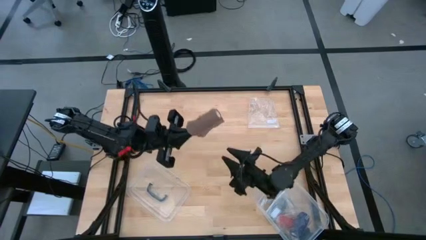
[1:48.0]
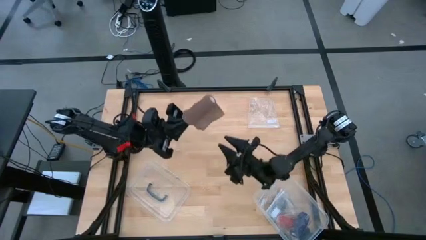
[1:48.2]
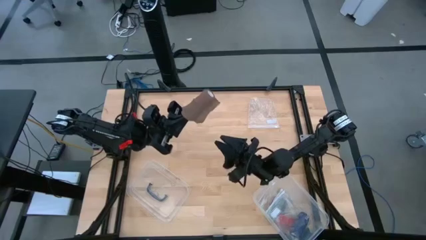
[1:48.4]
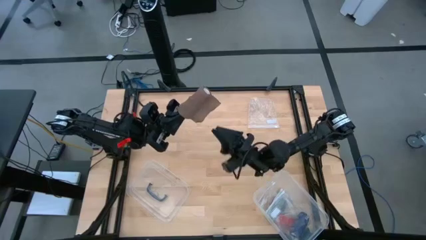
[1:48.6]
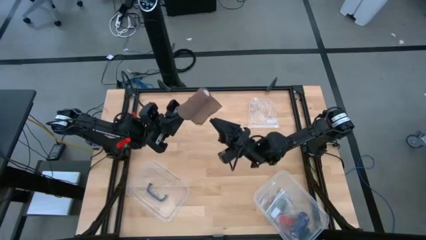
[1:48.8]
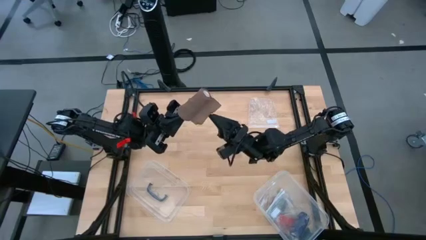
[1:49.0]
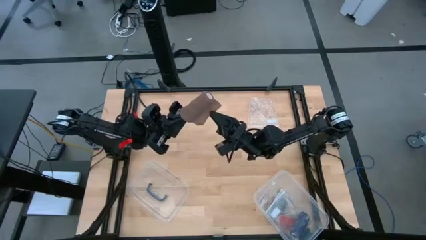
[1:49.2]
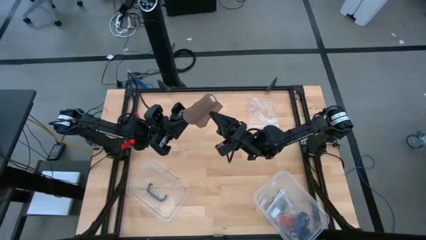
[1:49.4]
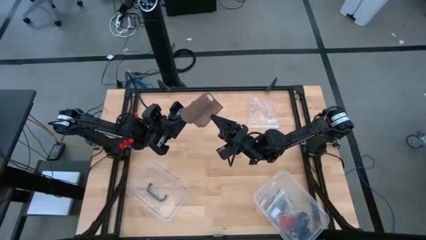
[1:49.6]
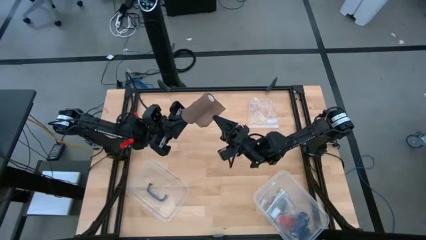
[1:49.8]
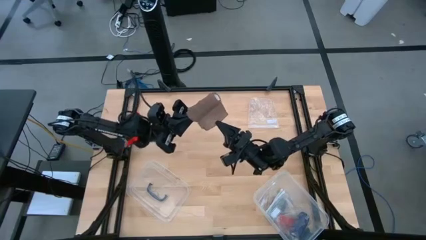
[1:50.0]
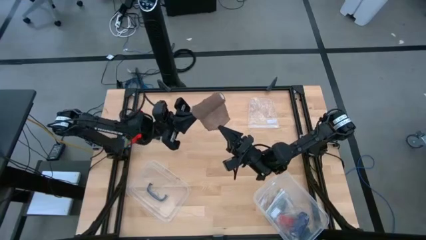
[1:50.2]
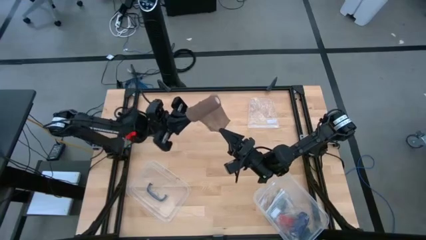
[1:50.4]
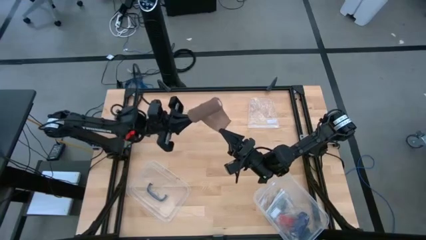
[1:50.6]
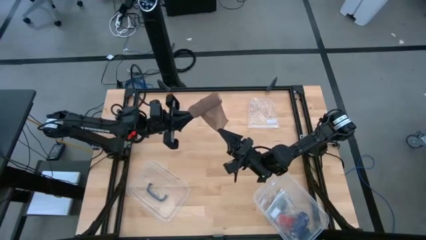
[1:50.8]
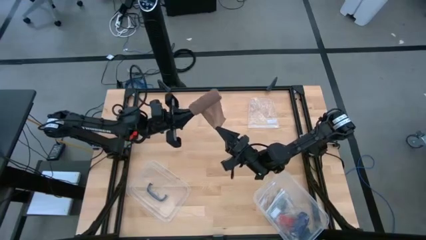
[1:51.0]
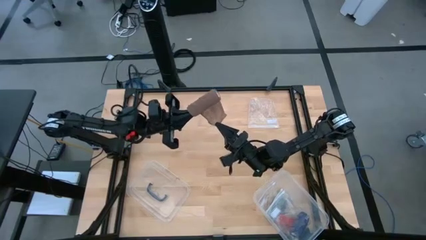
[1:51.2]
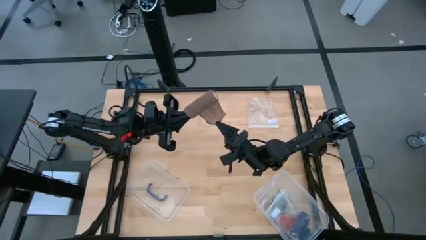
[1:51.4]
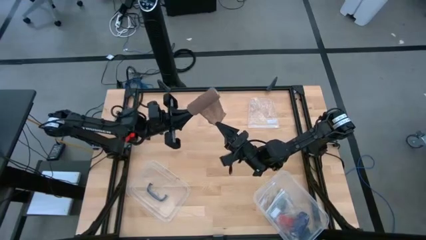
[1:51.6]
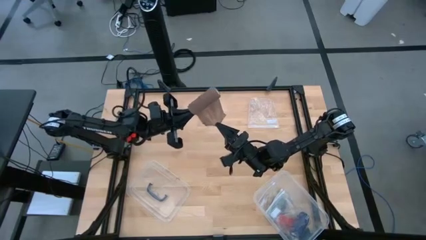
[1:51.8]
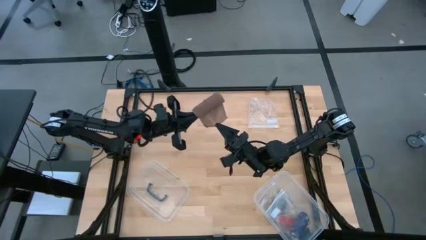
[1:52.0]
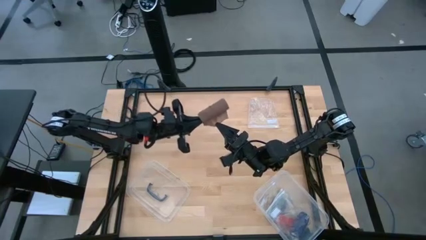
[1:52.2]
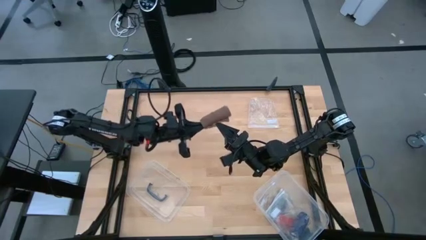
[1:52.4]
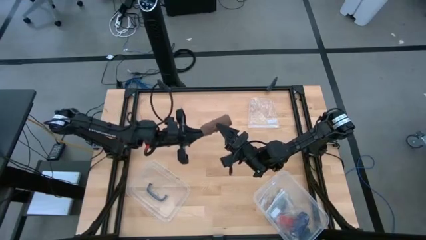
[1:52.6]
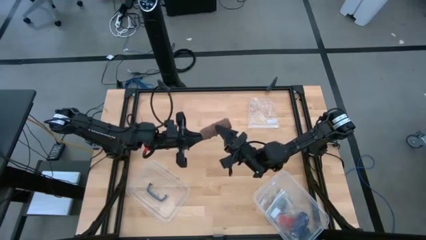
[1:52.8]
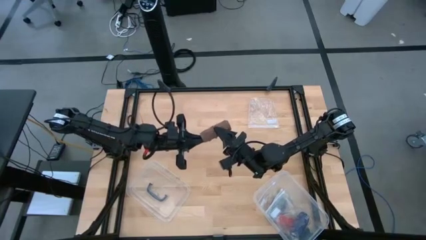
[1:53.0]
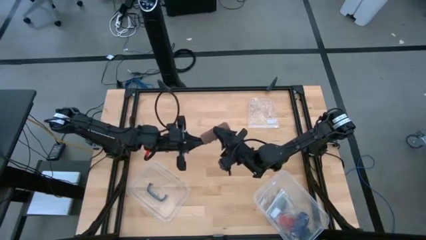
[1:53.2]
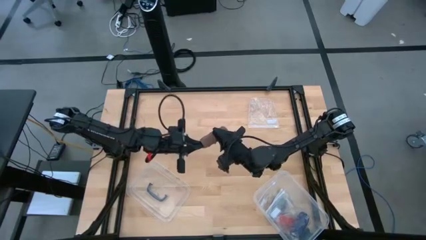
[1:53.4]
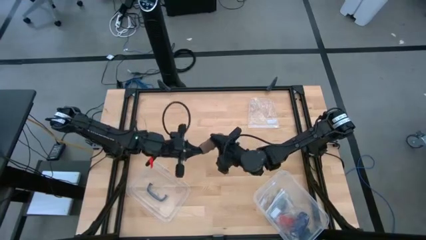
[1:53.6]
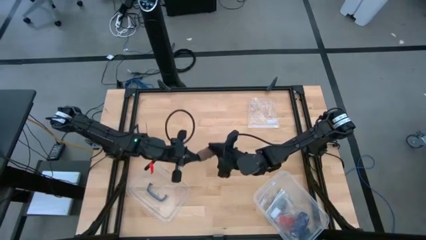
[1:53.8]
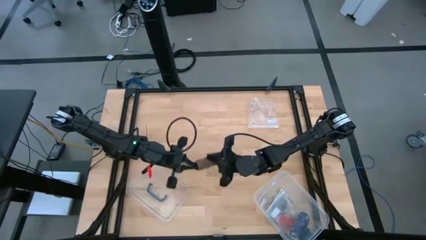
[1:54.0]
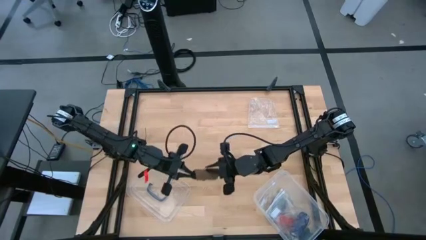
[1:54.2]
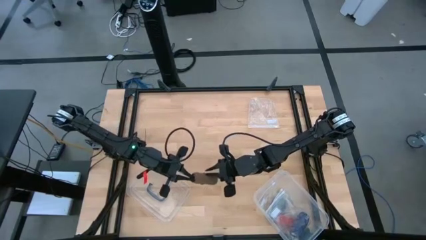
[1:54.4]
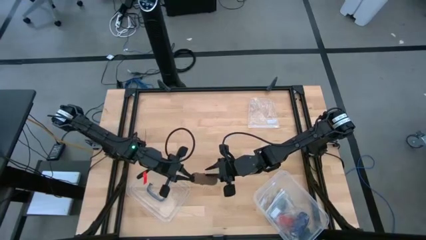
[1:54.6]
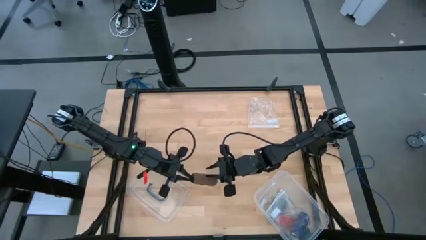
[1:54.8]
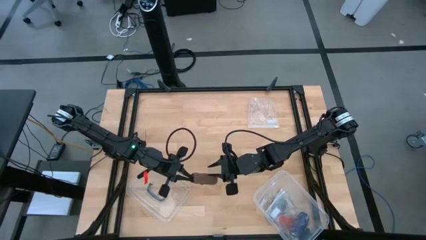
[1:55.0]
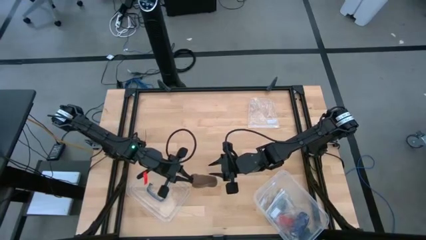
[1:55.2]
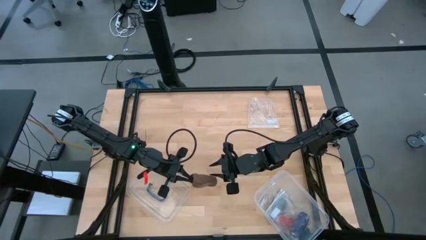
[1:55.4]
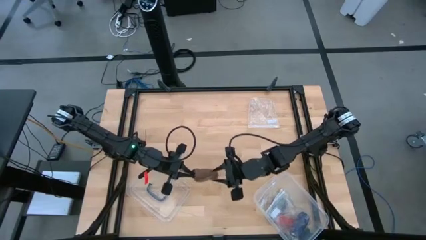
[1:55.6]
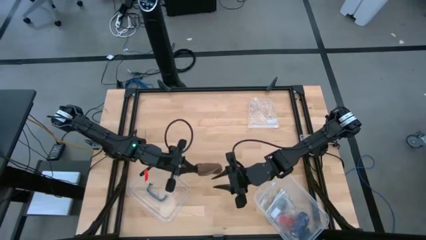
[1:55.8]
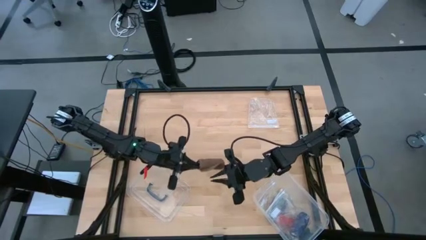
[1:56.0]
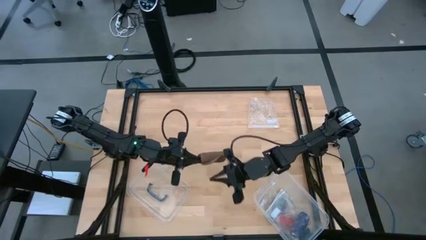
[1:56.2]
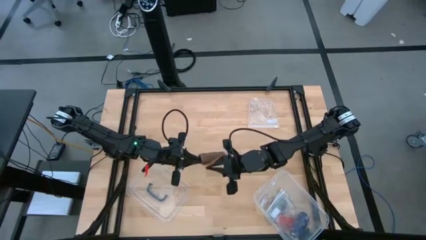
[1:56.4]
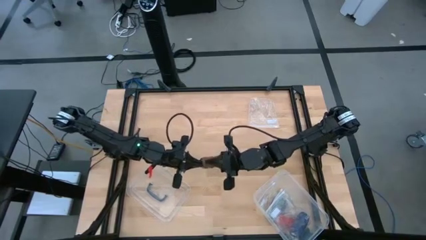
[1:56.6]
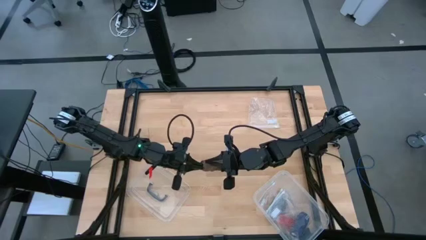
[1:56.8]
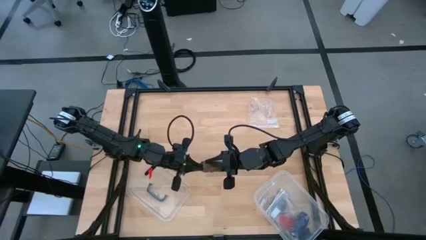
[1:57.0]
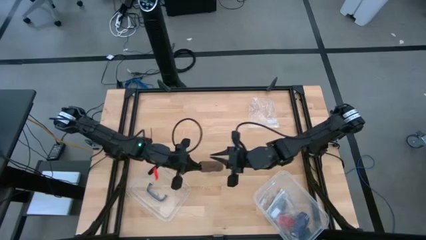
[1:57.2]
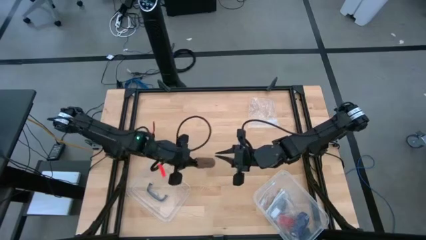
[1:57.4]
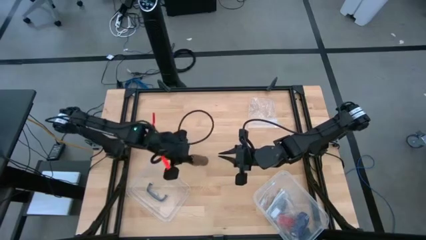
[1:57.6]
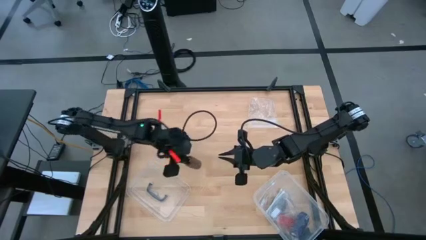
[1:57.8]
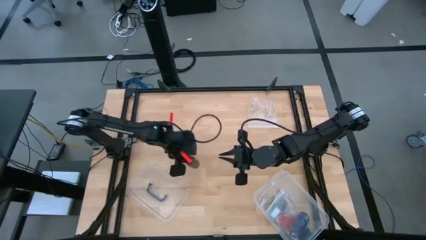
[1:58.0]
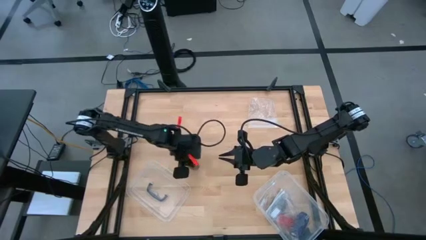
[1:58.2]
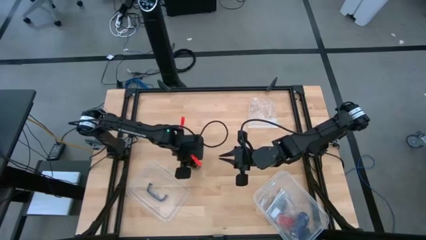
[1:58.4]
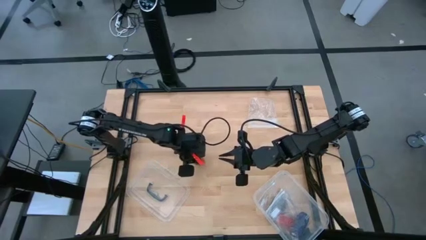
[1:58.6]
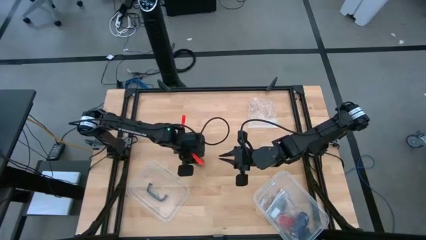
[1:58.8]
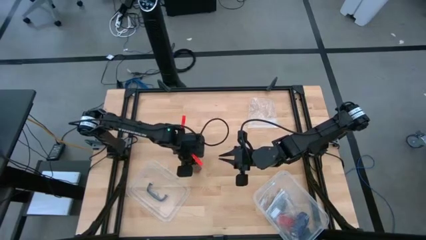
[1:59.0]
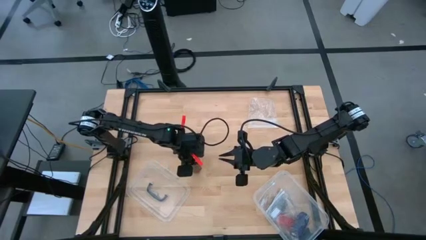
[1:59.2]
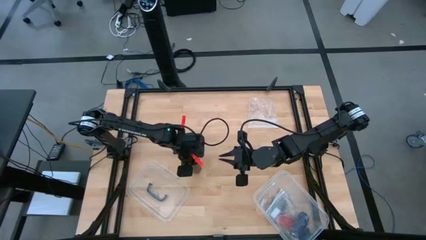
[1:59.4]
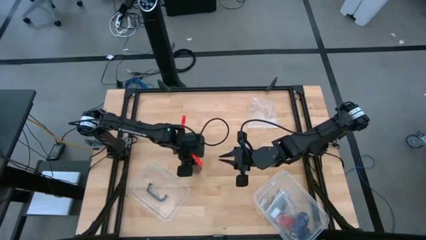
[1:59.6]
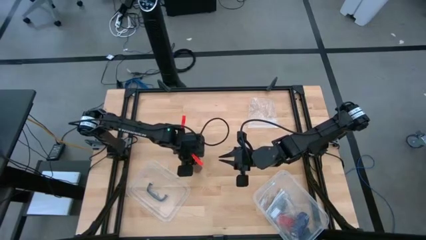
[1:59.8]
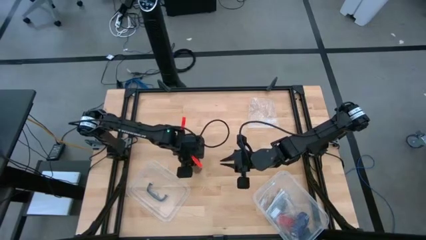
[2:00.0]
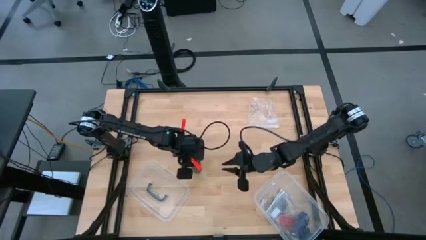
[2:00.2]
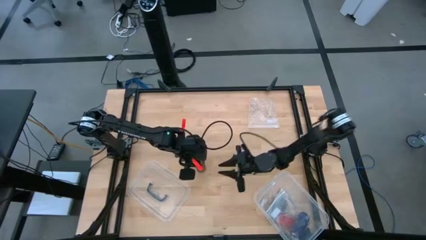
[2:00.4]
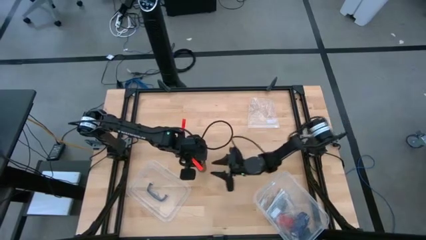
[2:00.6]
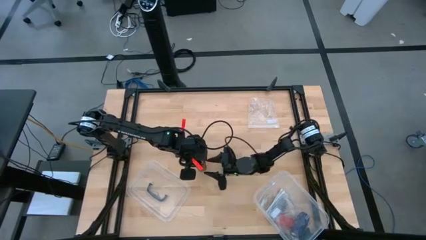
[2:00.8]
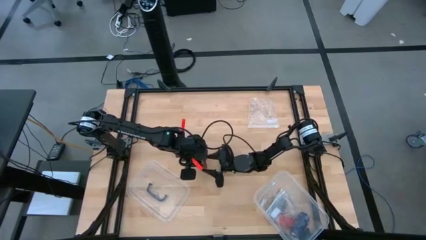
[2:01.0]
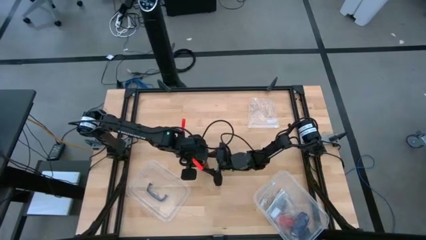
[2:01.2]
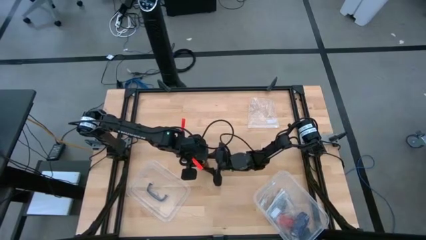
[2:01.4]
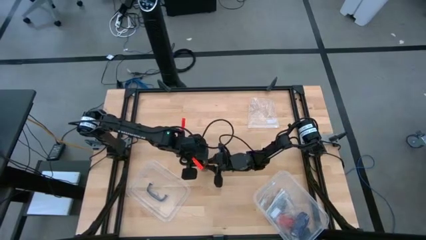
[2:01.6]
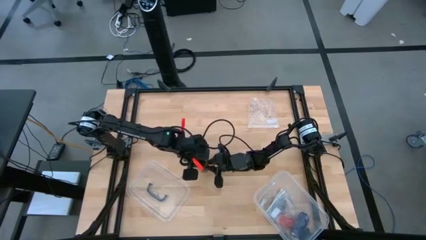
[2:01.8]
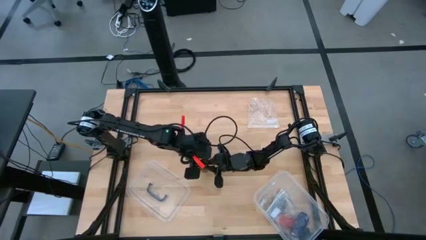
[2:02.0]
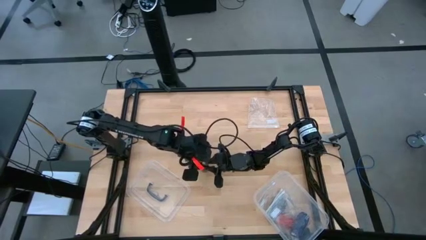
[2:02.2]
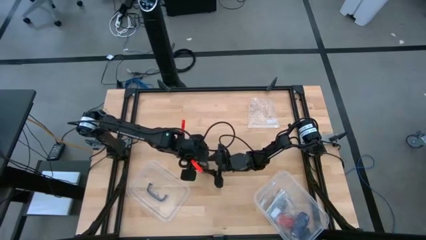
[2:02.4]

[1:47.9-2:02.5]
Task: Roll bandage
Roll the brown bandage

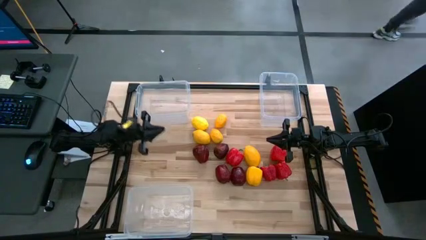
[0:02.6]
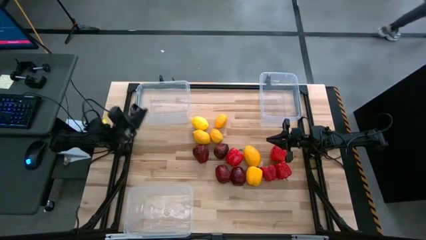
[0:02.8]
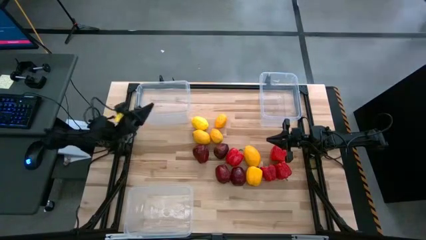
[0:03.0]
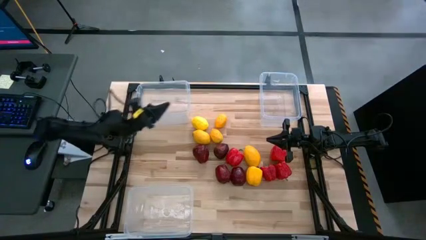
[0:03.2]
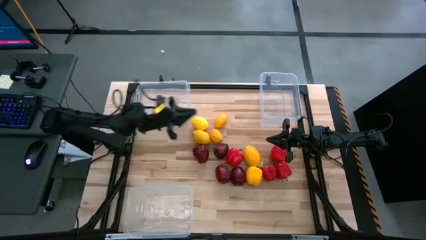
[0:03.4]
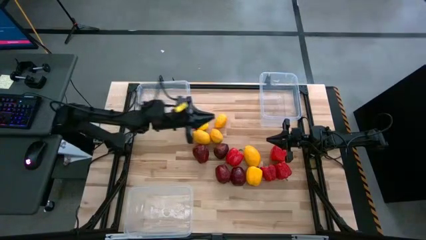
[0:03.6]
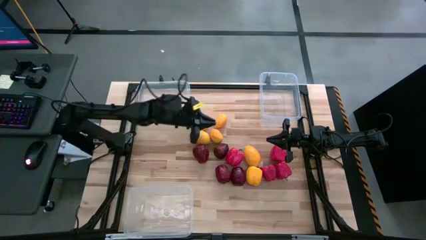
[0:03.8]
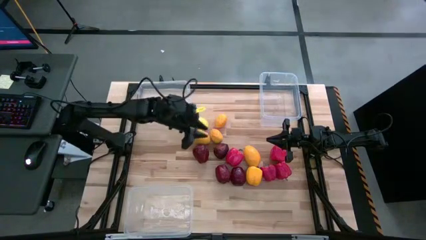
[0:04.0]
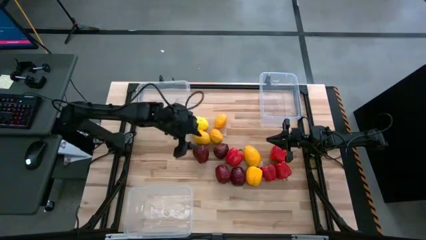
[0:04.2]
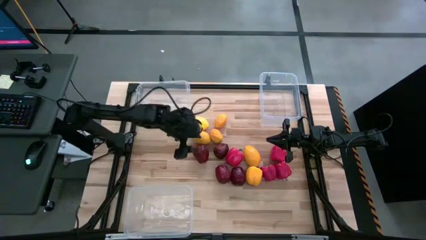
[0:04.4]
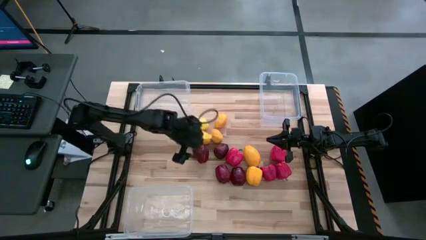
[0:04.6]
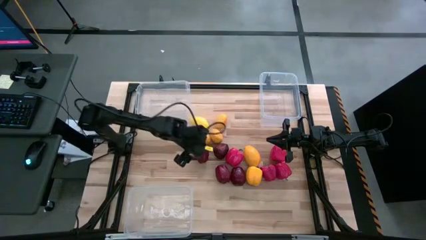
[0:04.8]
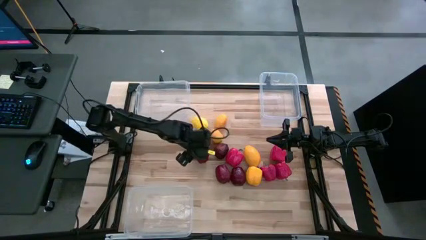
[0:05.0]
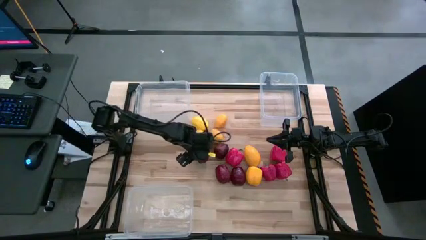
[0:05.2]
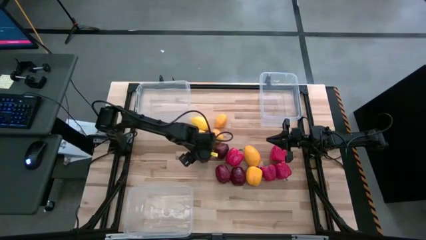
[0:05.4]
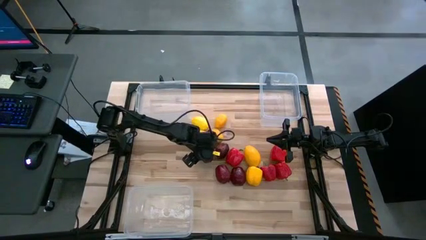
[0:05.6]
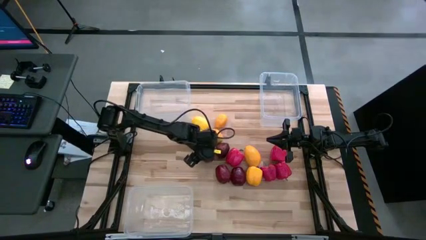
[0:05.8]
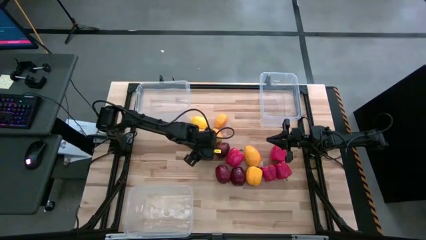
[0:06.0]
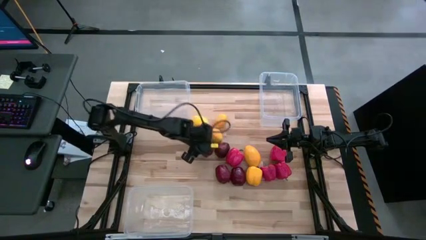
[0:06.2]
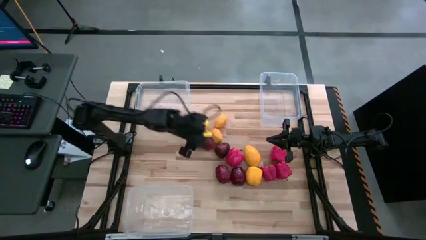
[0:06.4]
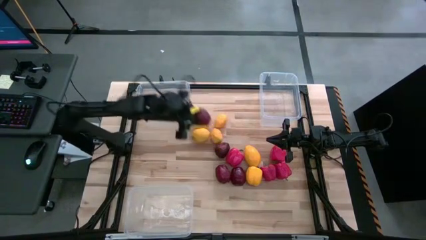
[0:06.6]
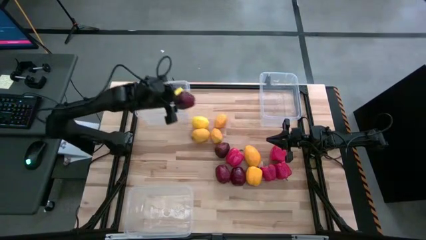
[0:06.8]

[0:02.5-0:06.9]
Task: Sort produce into baskets
Put the red apple into the top-left transparent bin
